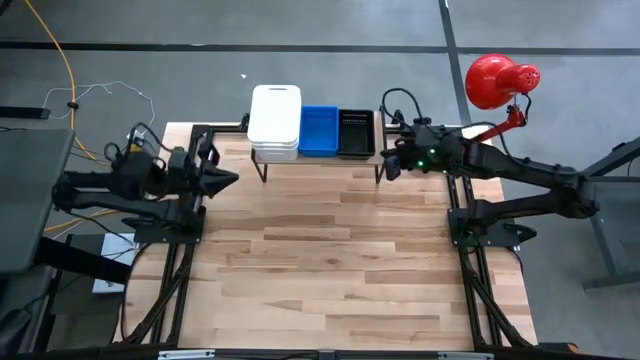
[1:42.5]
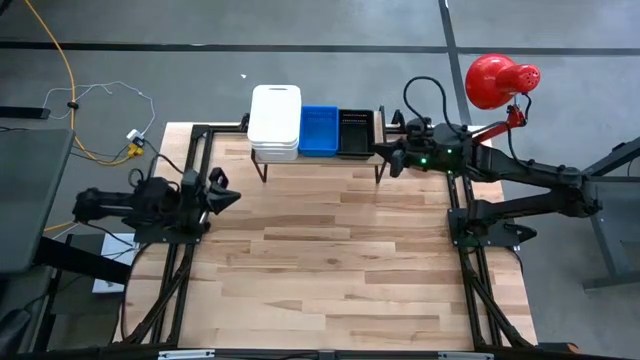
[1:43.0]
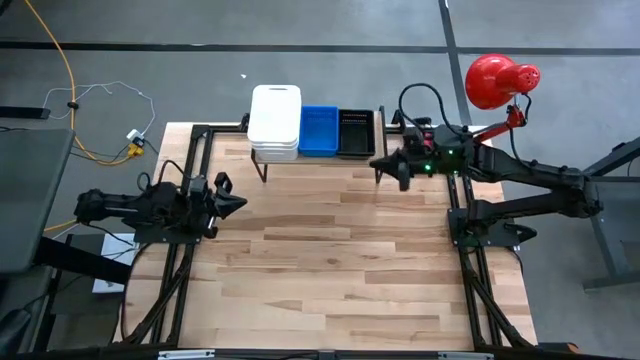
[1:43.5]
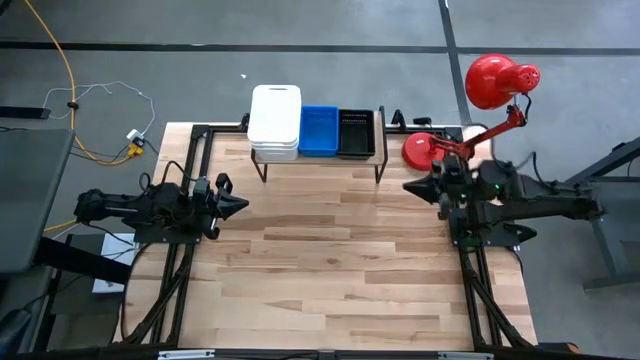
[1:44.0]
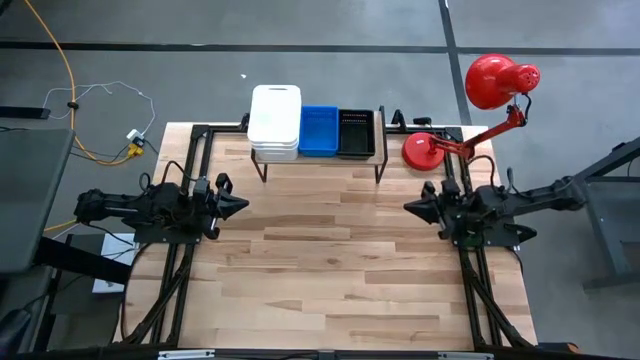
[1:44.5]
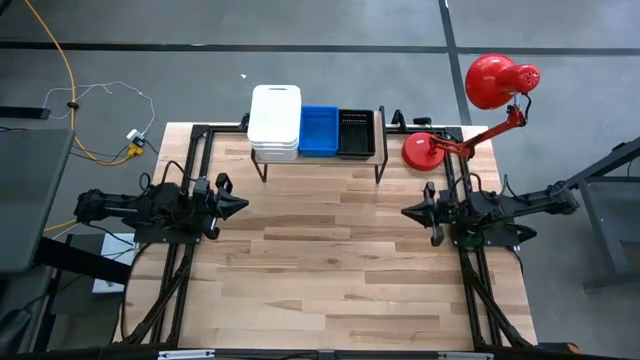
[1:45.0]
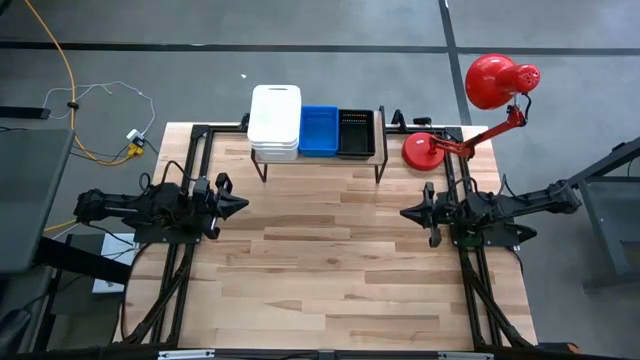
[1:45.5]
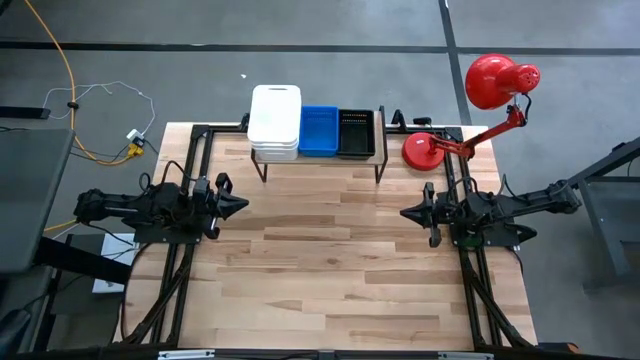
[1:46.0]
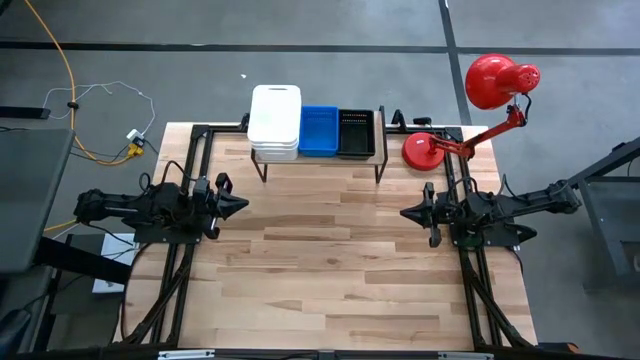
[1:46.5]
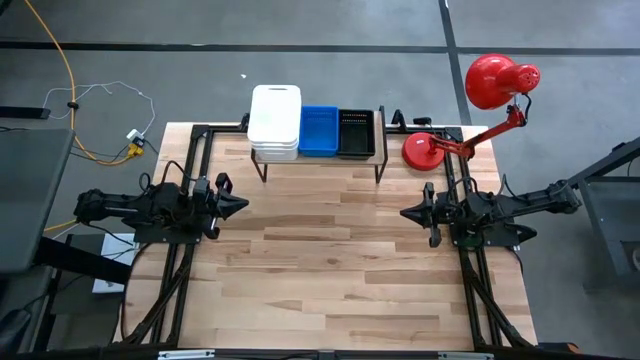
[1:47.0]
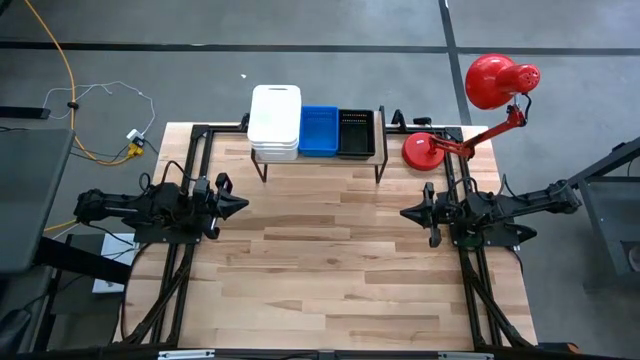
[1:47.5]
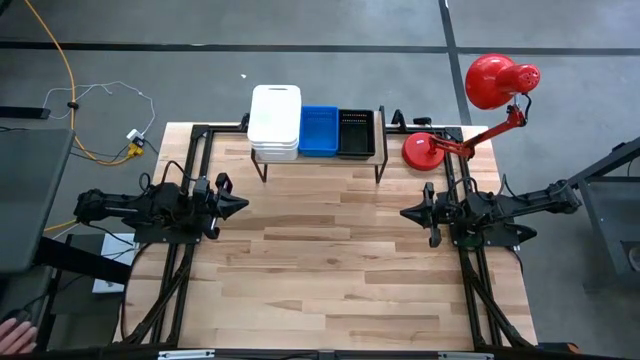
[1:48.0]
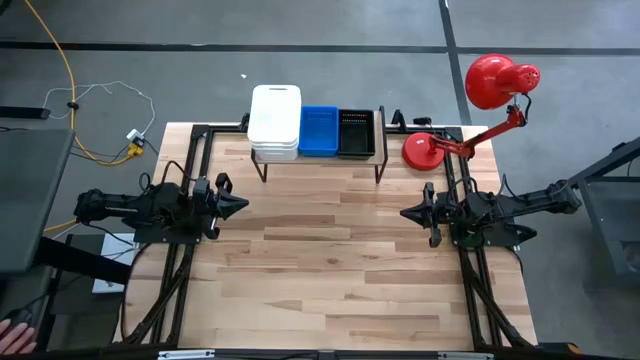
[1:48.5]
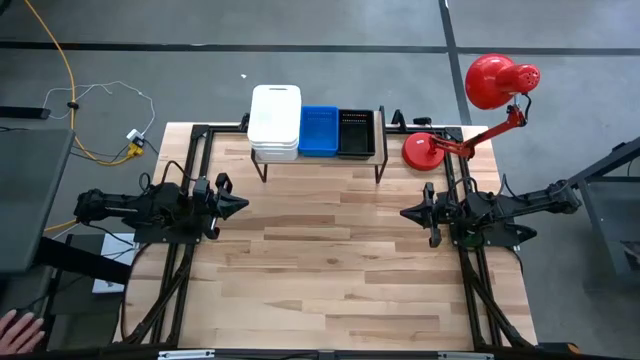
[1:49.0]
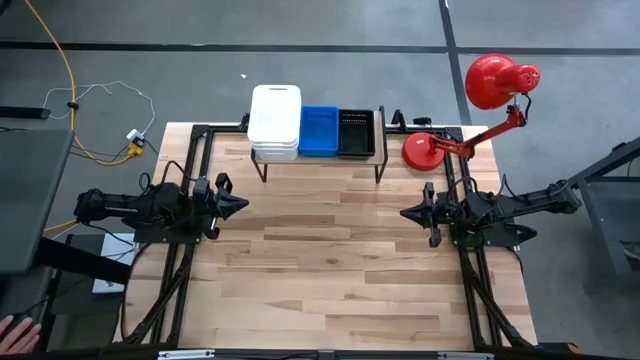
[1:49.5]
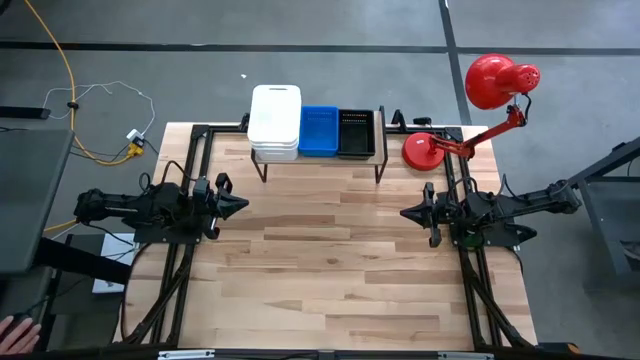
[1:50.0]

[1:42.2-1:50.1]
Task: Stack baskets on shelf by color
Return to Home Position

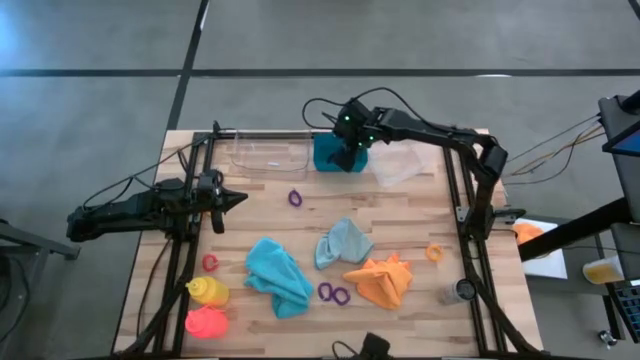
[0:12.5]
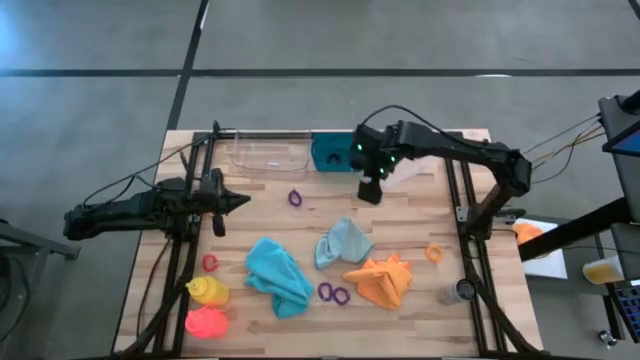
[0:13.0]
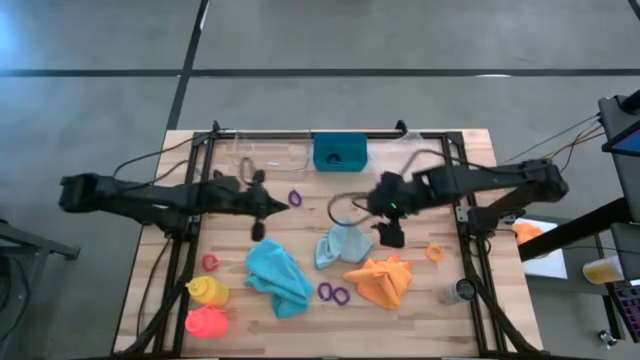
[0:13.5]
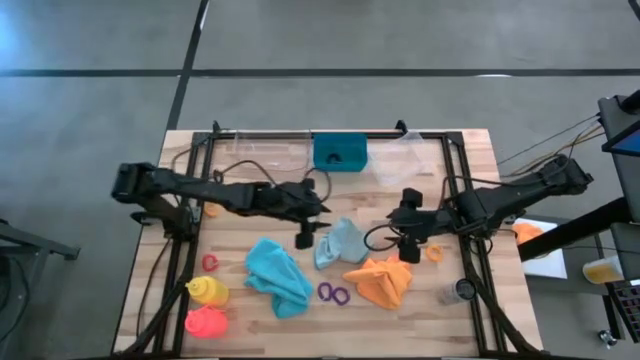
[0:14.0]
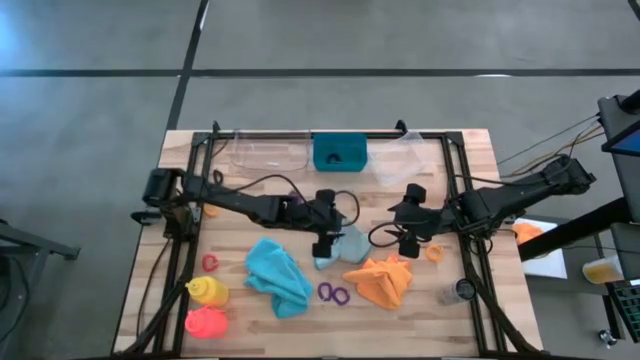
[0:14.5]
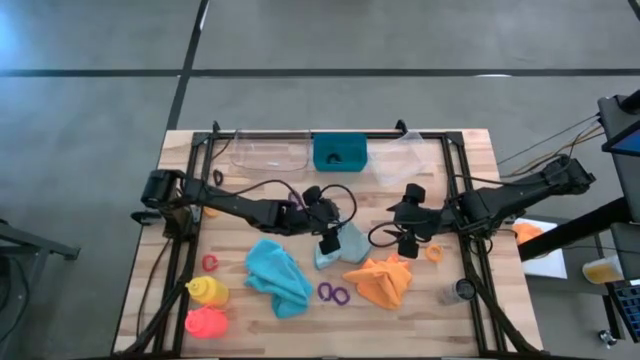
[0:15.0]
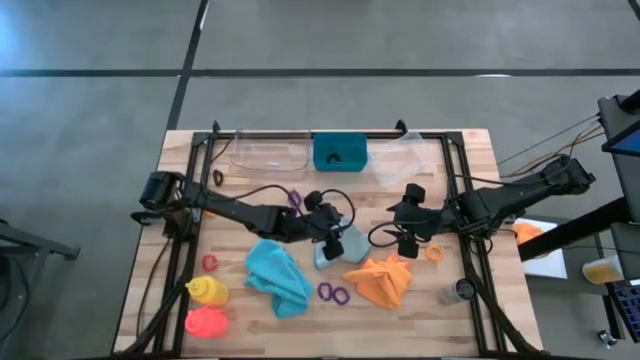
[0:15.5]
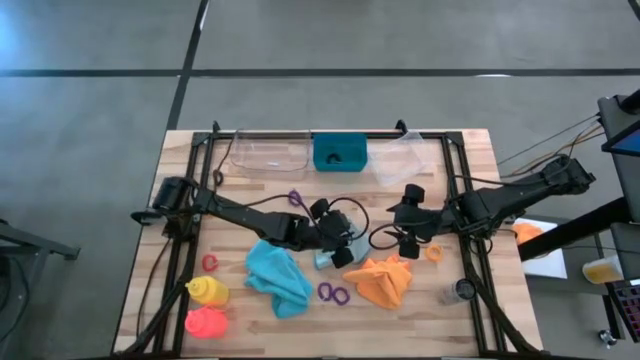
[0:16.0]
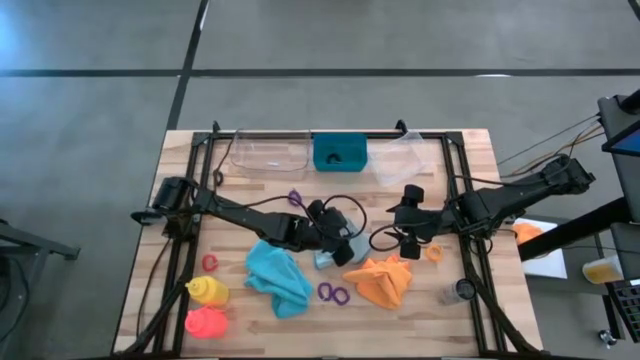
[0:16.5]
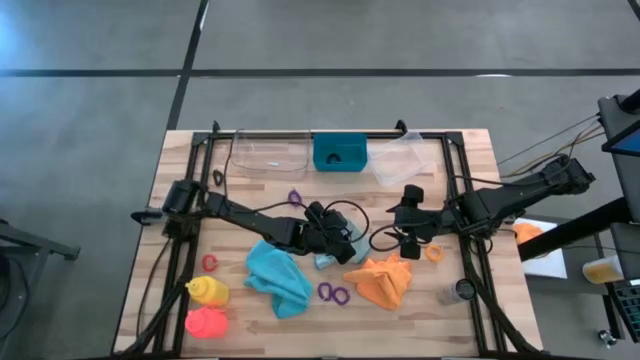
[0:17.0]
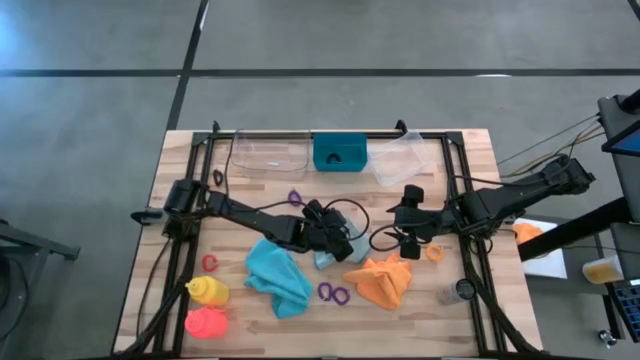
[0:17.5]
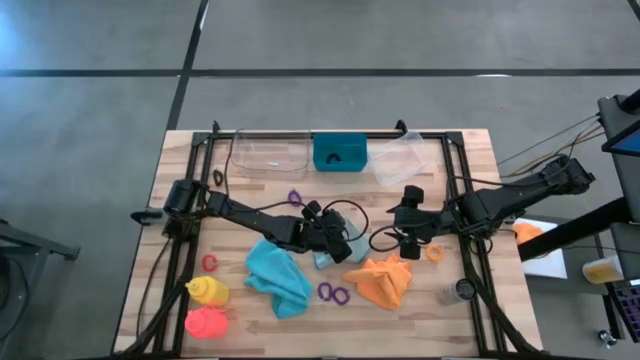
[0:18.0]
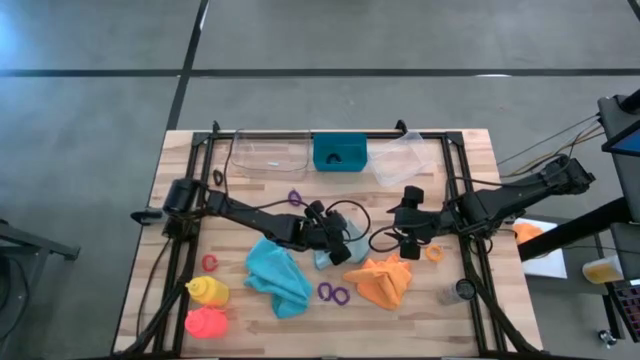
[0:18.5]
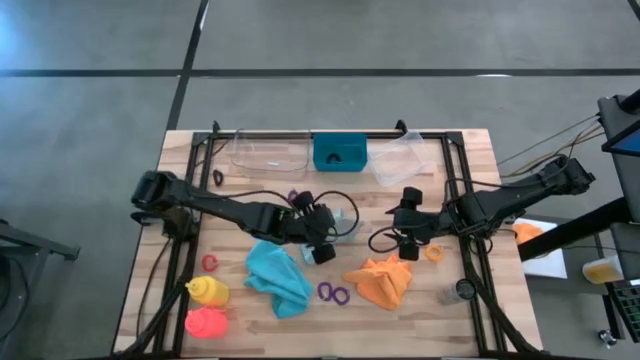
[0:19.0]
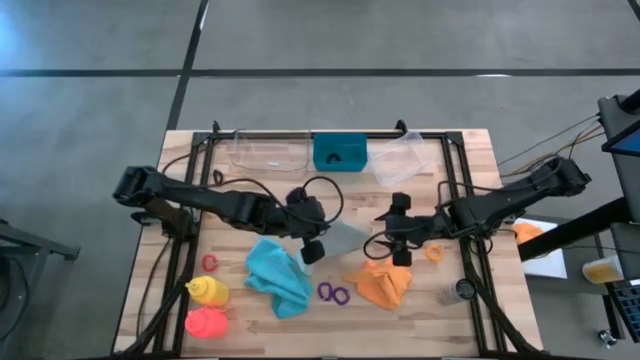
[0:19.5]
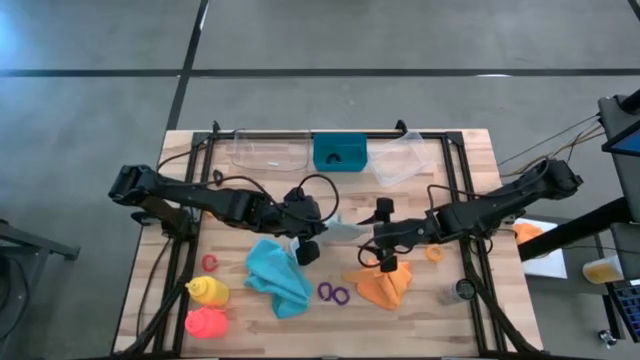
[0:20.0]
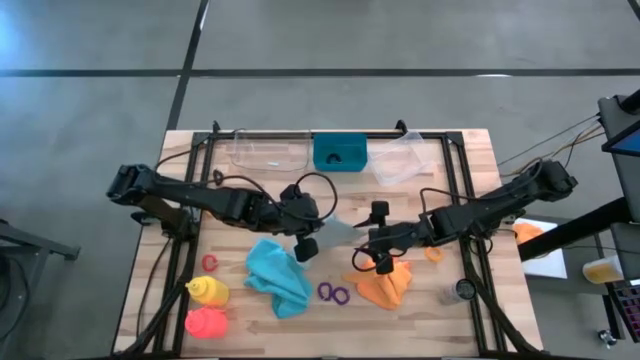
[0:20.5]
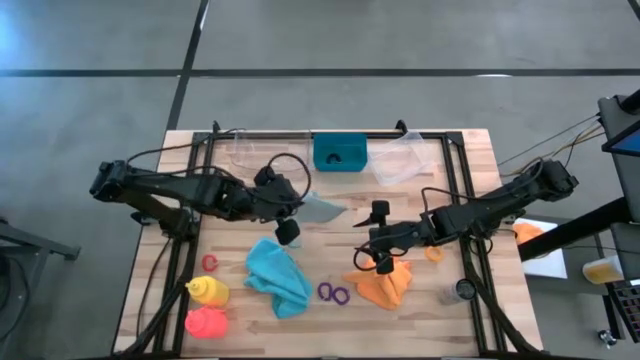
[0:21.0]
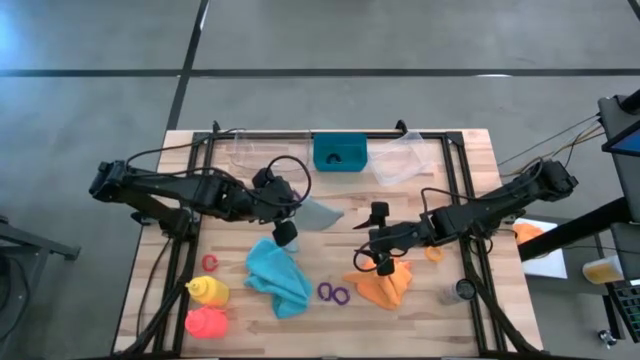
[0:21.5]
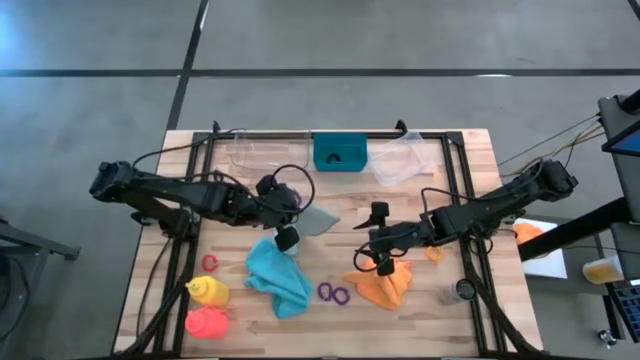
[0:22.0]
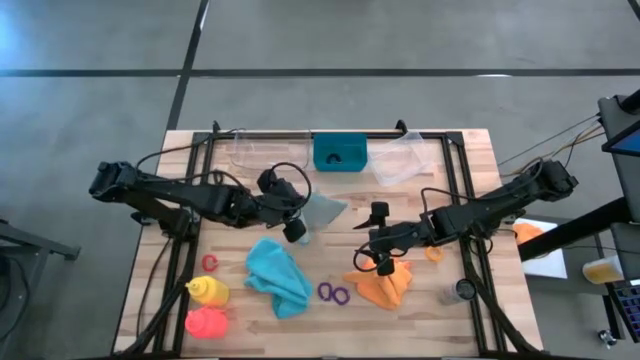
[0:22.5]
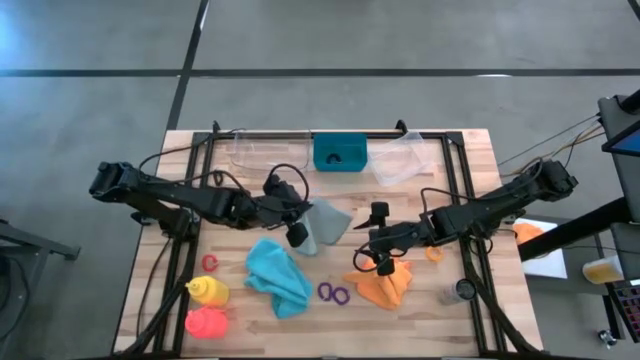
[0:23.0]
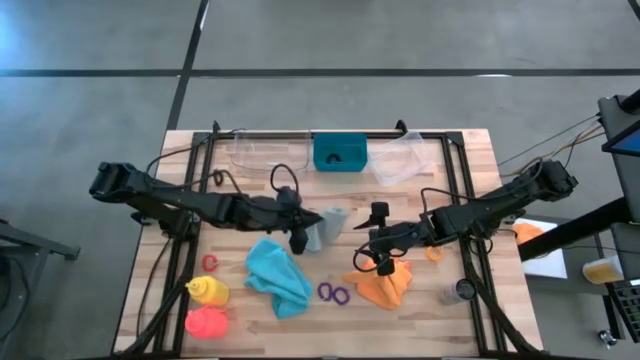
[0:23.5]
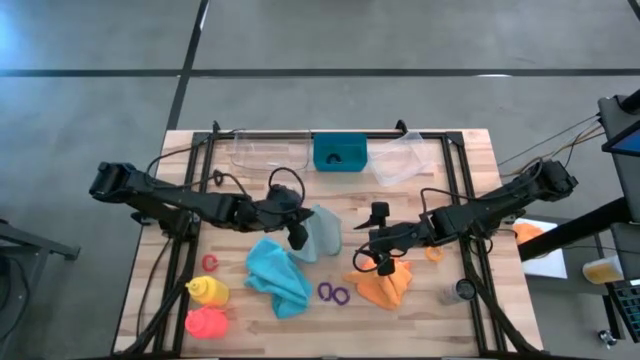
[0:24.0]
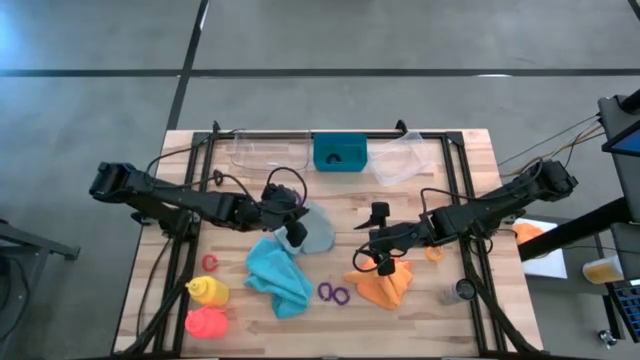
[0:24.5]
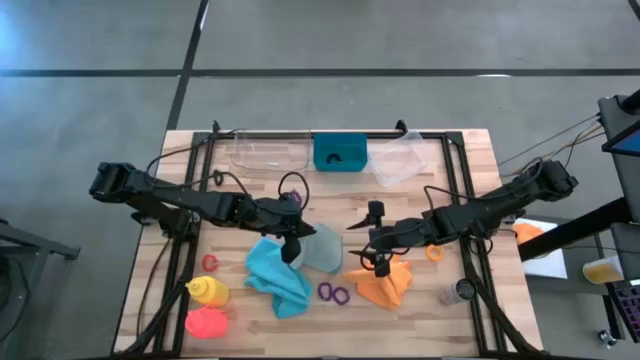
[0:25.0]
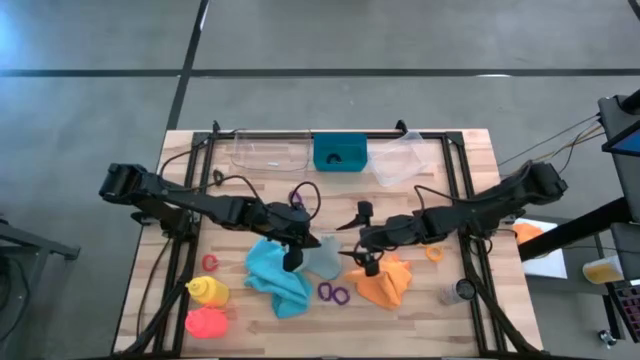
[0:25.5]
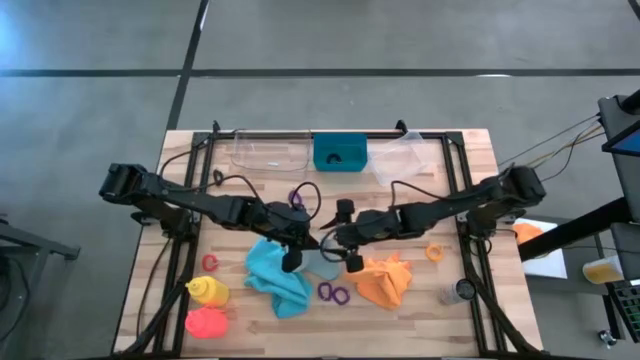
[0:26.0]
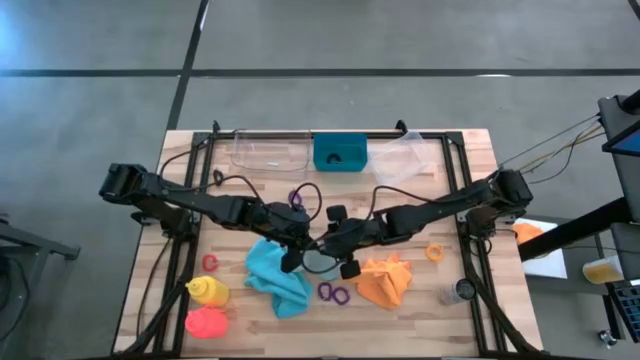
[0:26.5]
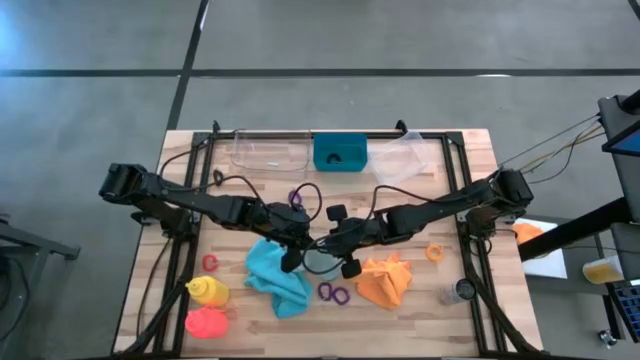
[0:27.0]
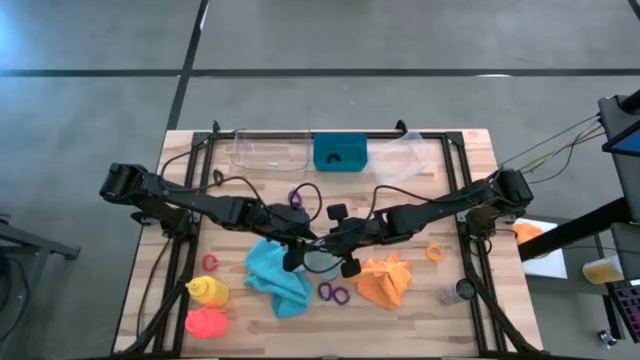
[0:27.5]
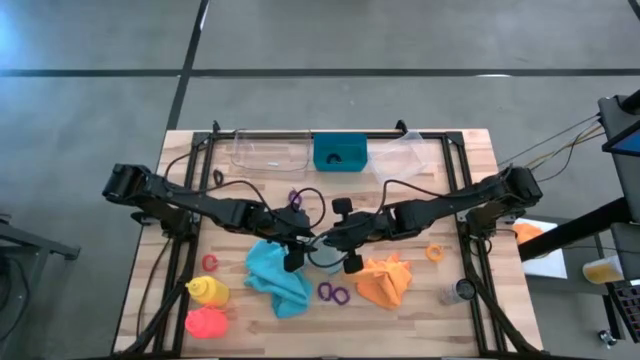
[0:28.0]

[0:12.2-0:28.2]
Task: Pick & Place Sports Items
Fold the light blue towel
